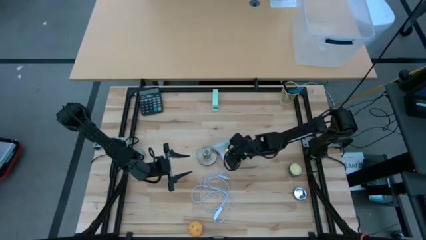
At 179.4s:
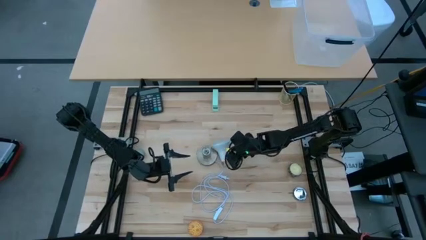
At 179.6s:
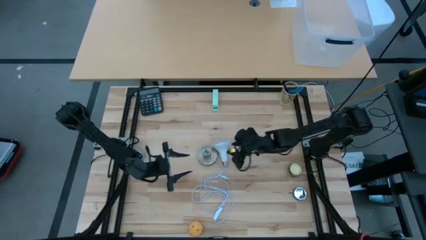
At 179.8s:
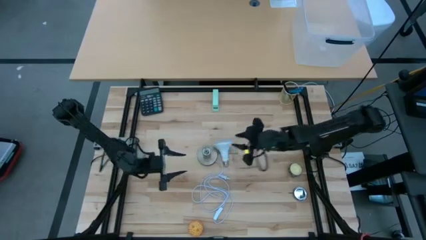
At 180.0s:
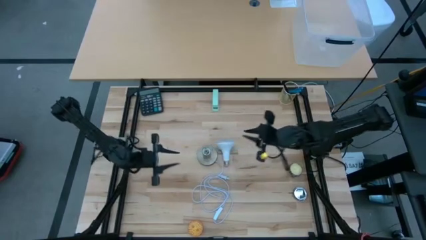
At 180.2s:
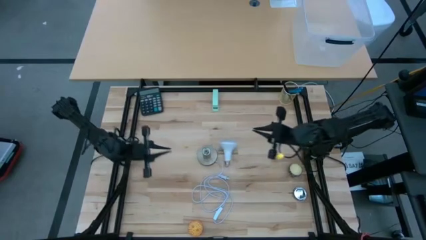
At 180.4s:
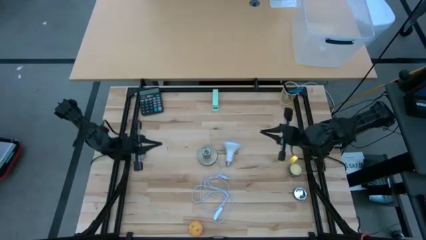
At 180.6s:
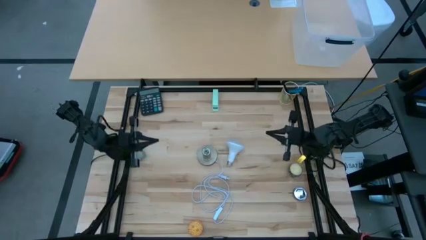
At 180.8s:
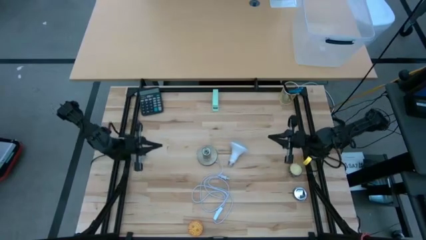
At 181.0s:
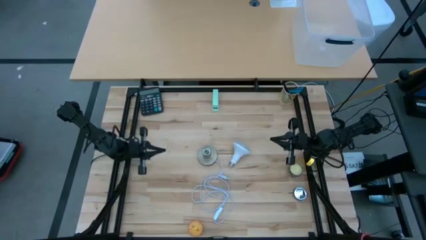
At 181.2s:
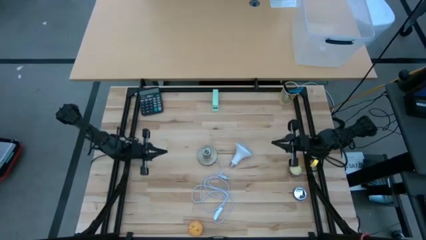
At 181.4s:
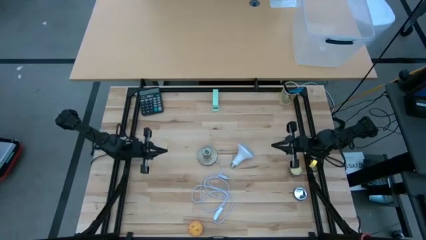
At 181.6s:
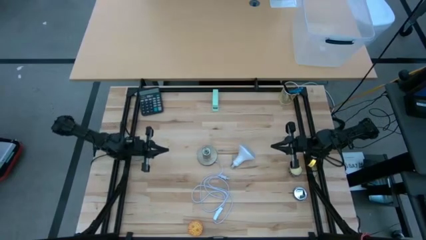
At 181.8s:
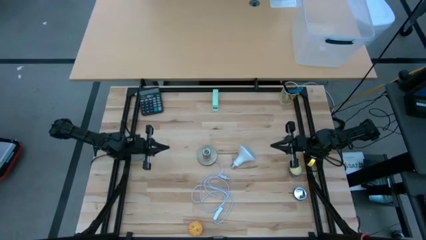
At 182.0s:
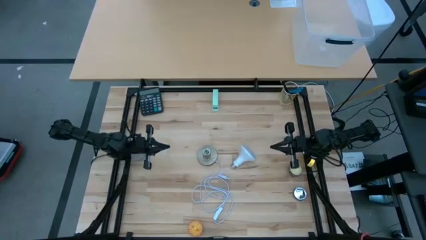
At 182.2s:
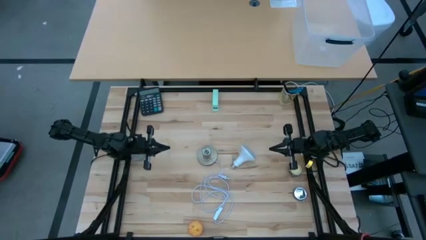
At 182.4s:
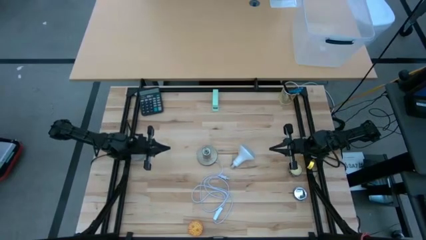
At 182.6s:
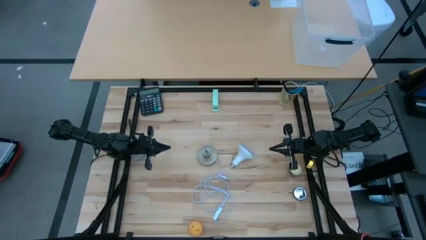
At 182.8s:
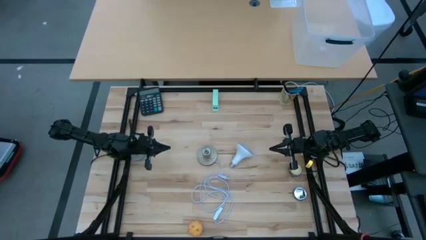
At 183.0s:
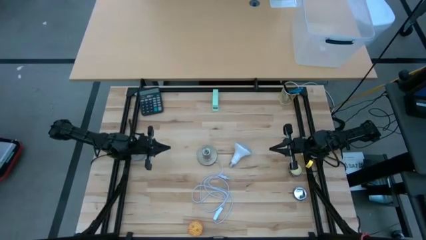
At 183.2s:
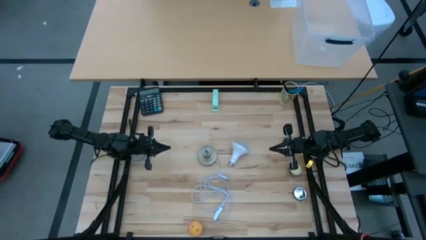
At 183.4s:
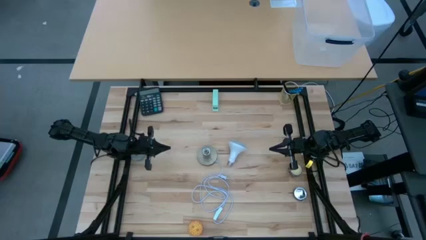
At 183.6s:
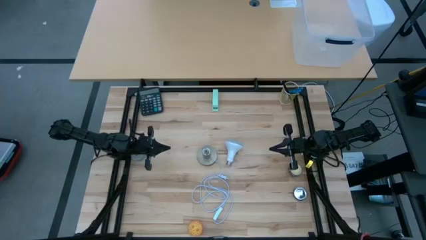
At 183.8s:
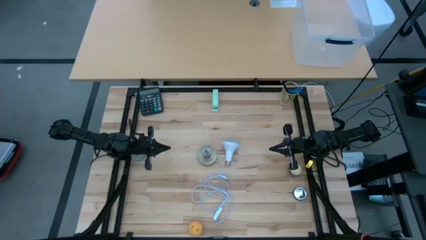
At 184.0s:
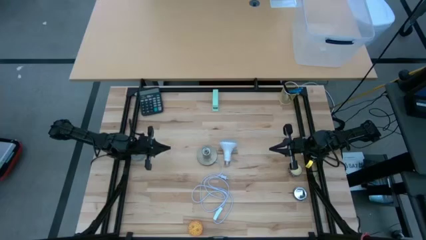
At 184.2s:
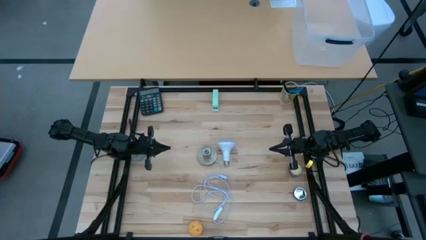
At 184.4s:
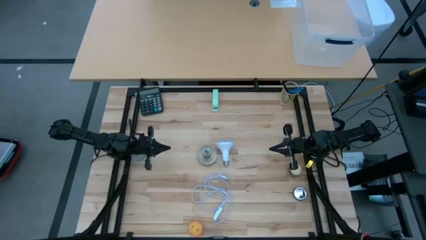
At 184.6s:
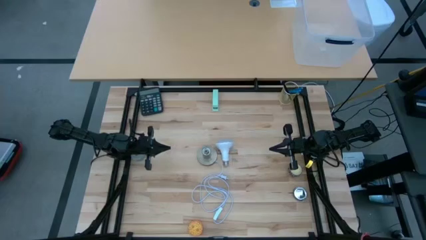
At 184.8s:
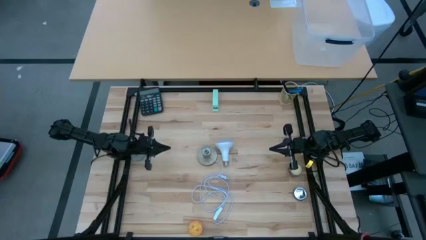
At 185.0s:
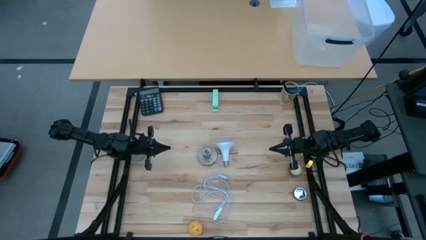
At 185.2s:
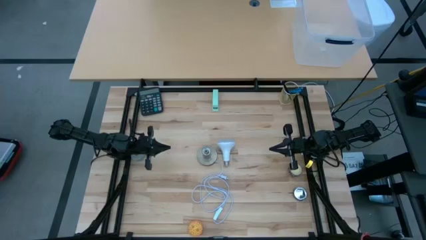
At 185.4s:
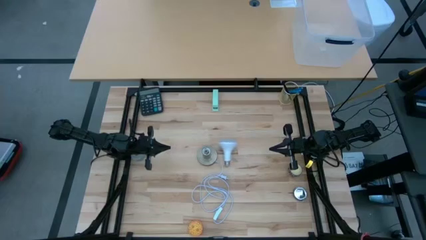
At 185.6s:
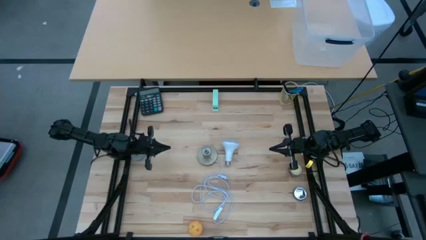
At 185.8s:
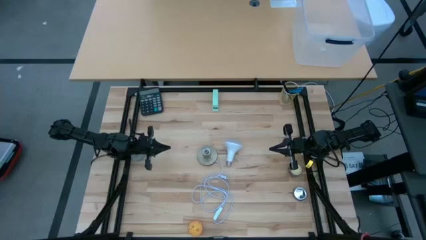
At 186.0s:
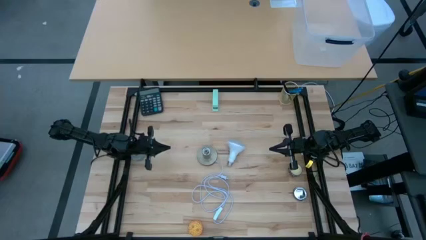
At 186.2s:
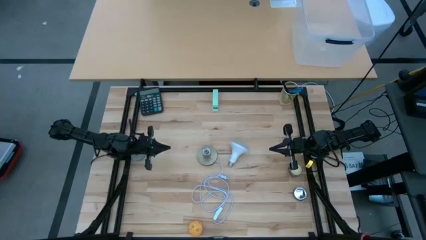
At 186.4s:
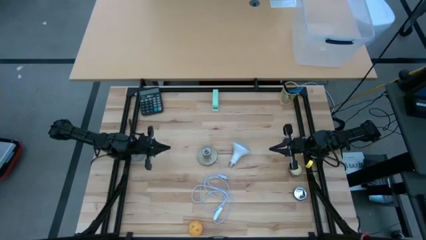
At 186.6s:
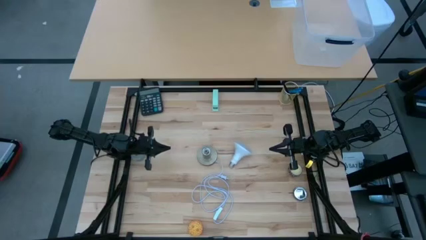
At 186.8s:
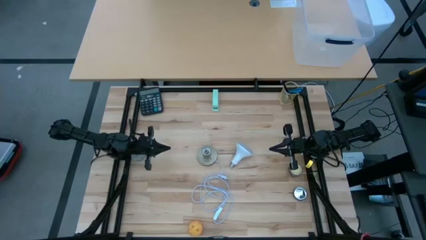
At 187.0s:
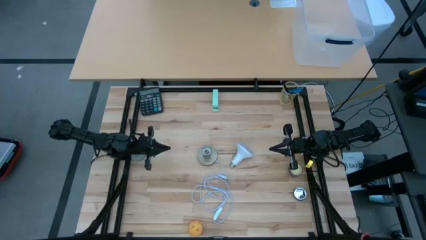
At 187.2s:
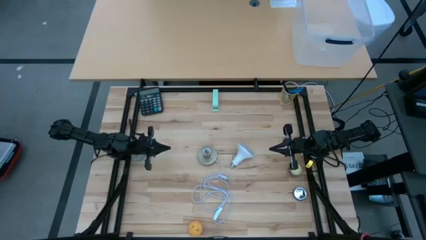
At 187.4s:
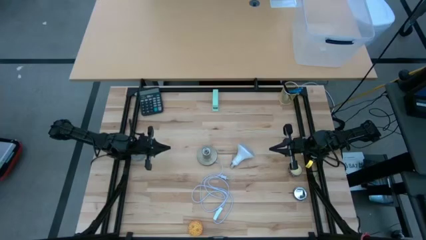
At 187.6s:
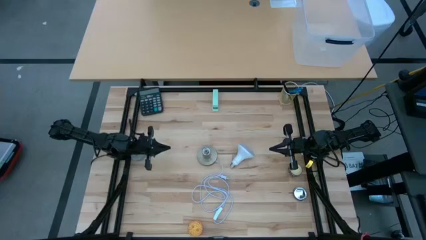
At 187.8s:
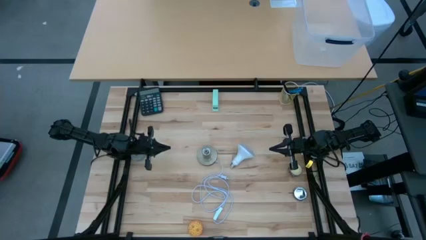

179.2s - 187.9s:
Task: Screw lightbulb
Return to Home Position

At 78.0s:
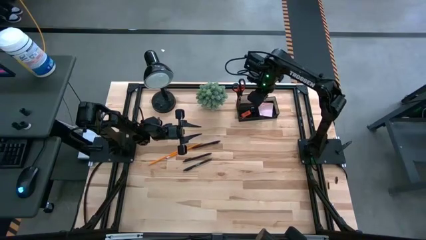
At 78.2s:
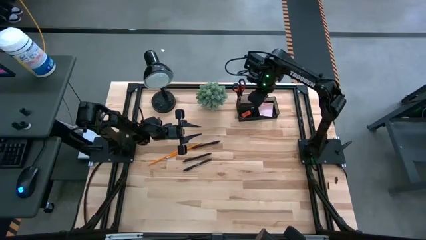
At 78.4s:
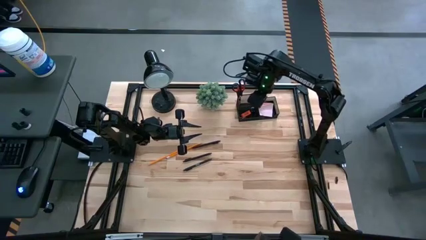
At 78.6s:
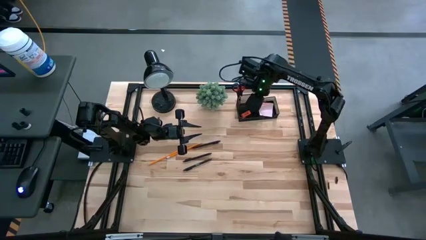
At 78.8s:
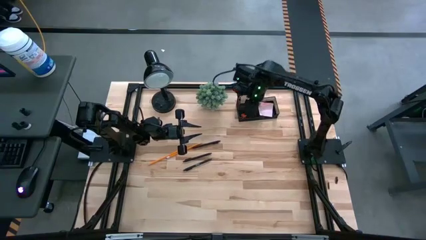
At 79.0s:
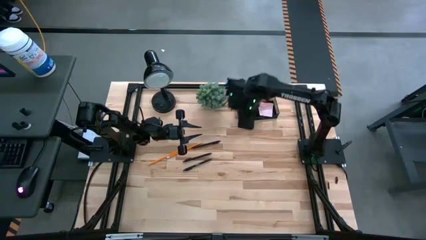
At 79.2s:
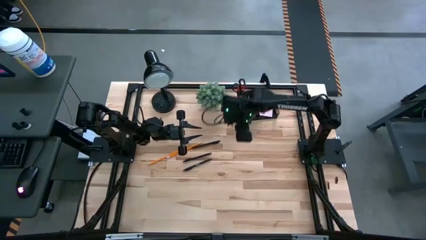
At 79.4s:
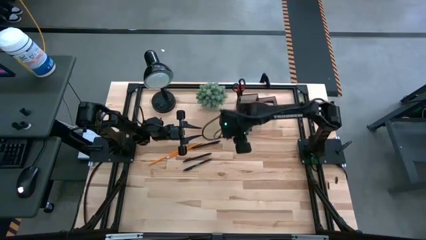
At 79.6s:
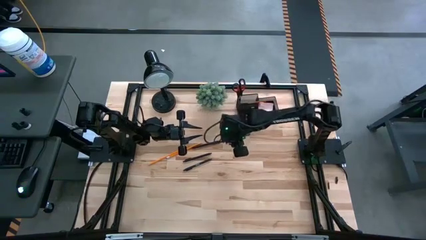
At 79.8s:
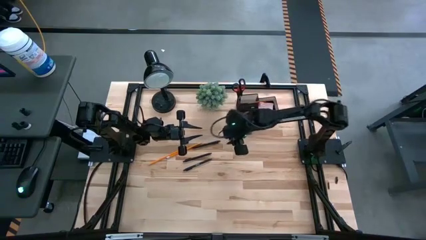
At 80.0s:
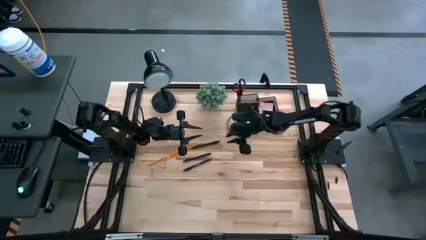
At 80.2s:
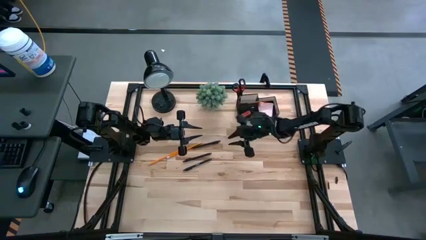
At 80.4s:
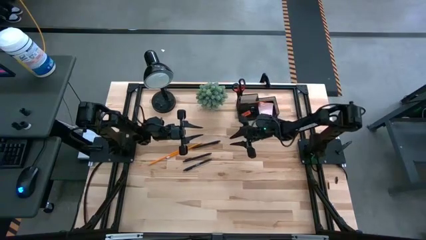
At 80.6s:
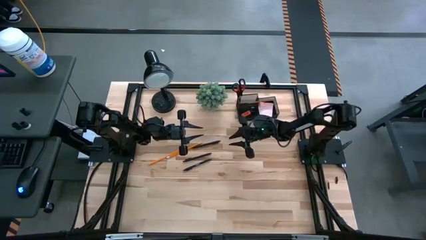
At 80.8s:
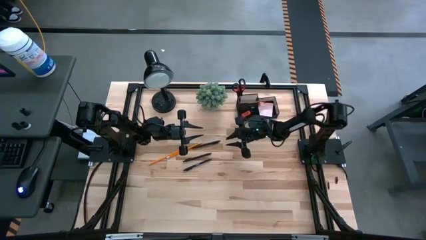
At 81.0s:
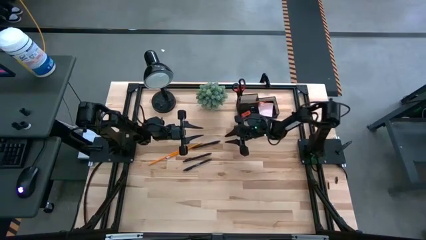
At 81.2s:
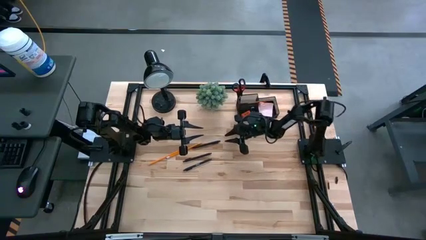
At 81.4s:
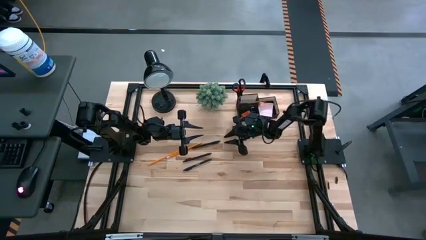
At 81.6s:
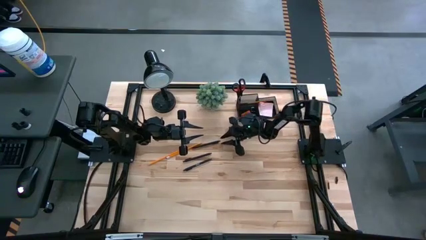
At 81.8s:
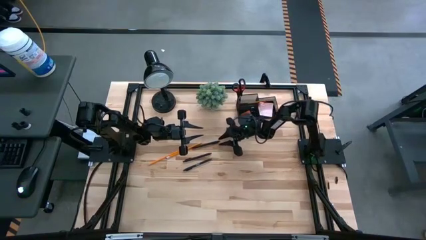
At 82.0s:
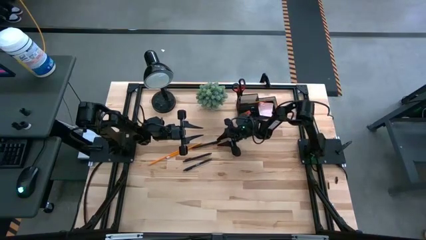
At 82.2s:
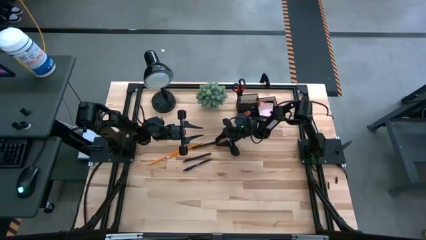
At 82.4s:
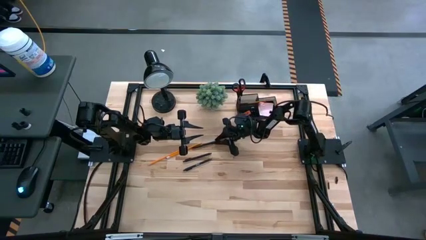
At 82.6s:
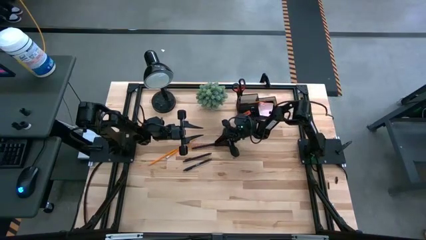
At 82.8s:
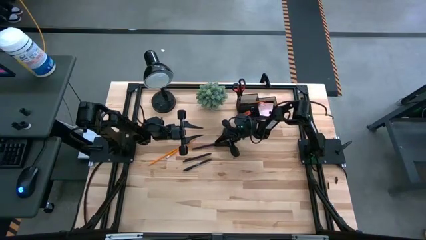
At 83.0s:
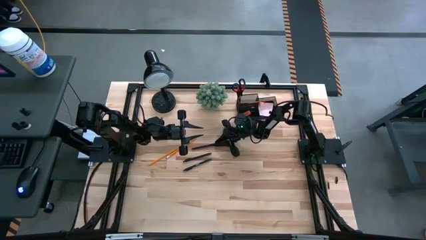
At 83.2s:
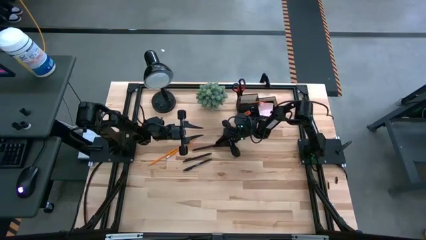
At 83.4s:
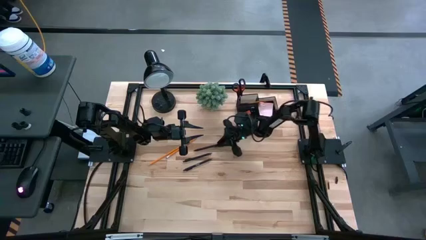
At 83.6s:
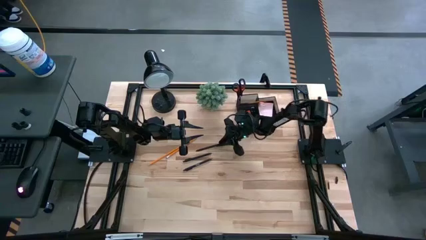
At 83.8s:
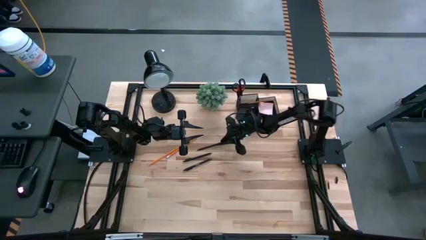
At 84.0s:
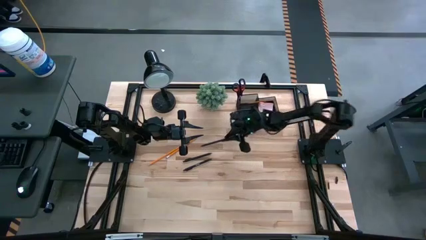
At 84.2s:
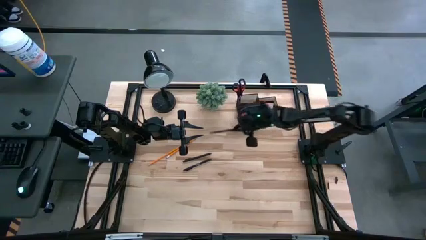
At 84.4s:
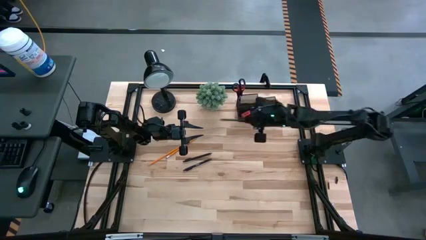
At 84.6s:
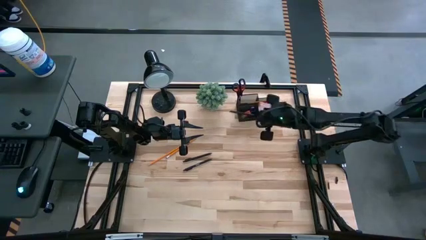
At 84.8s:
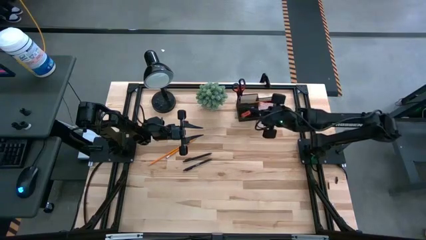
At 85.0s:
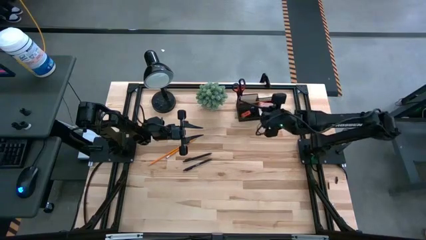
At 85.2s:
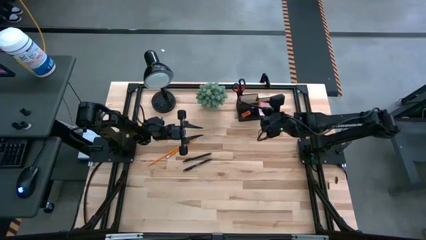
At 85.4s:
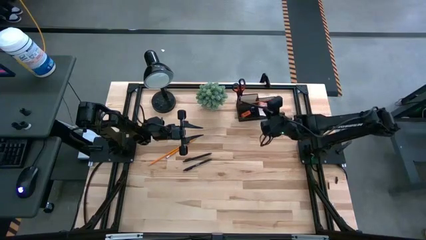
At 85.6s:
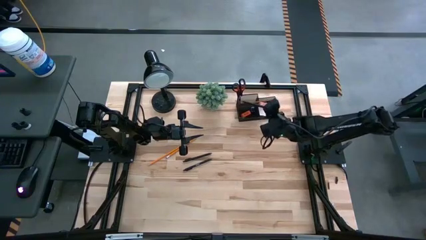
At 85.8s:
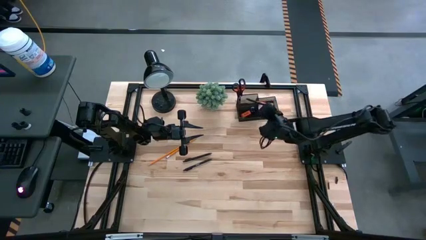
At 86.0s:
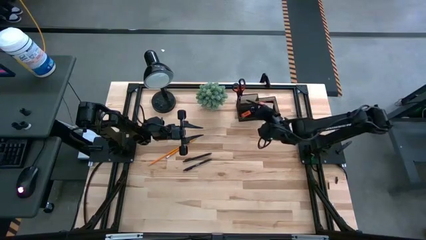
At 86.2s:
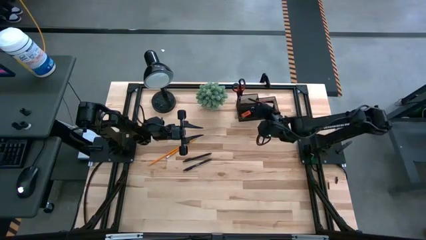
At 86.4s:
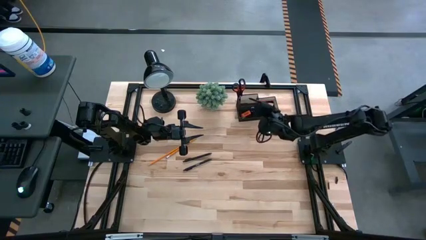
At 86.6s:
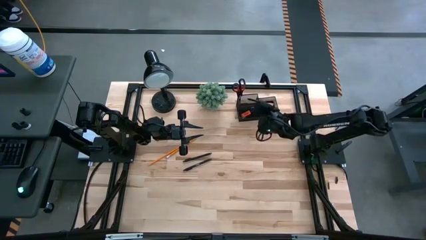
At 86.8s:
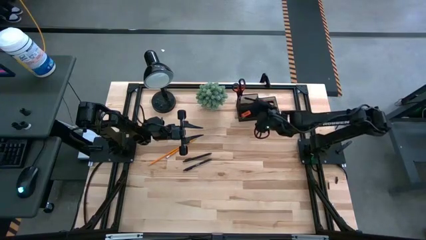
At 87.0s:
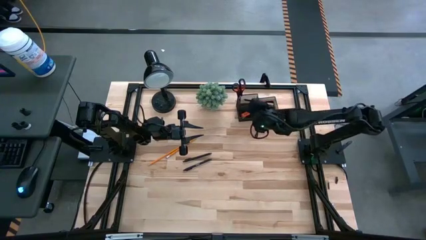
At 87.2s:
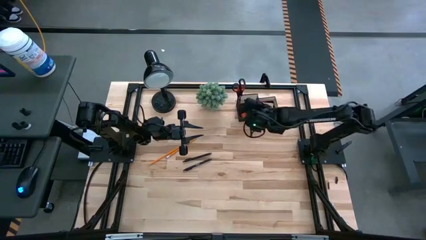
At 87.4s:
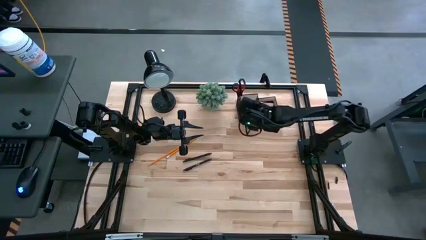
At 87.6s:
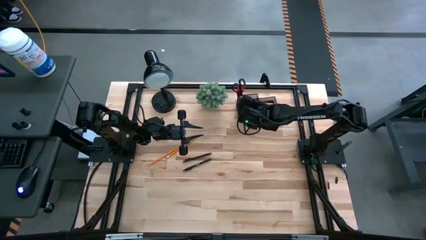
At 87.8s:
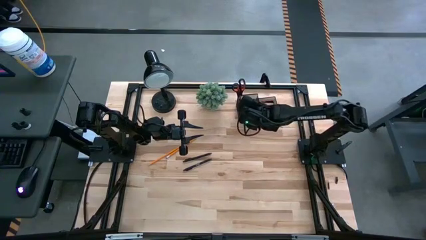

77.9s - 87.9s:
Task: Pick and place office supplies into organizer
Put the top black pen into the black desk organizer
